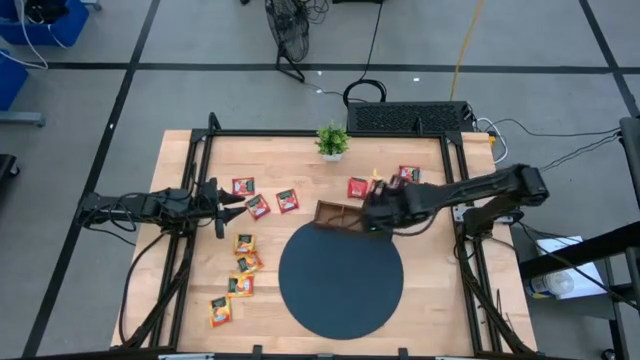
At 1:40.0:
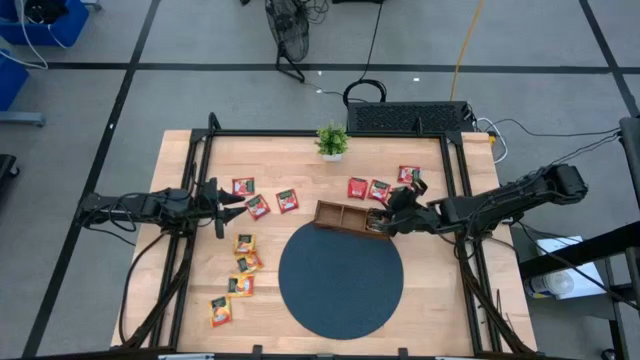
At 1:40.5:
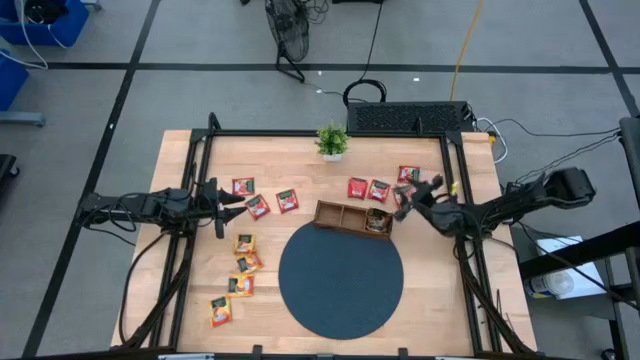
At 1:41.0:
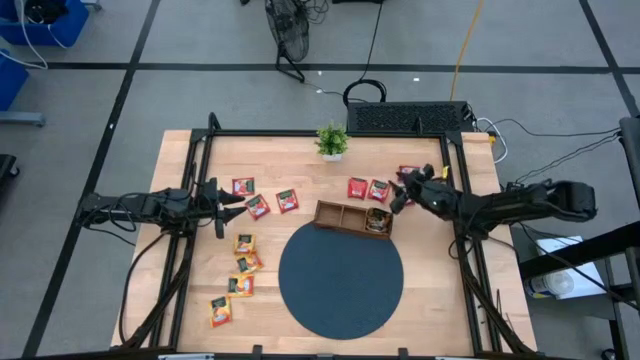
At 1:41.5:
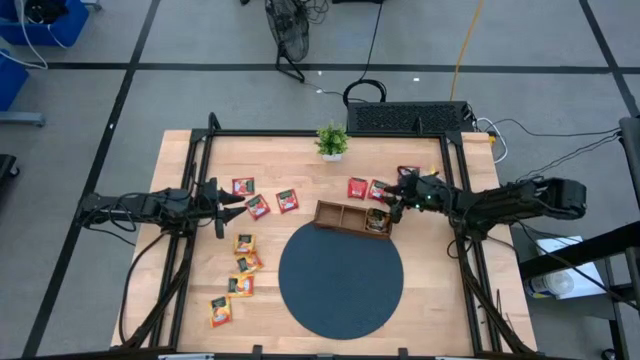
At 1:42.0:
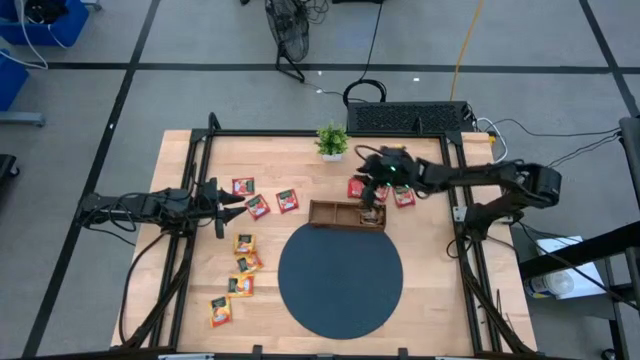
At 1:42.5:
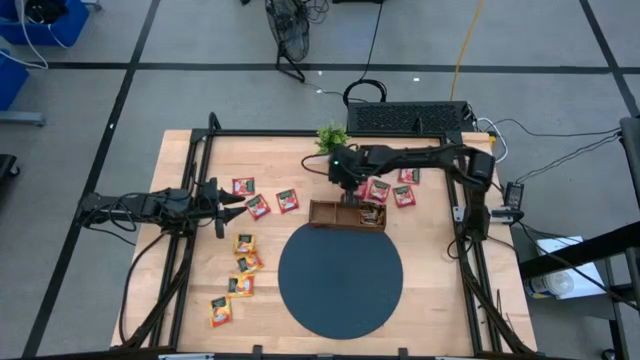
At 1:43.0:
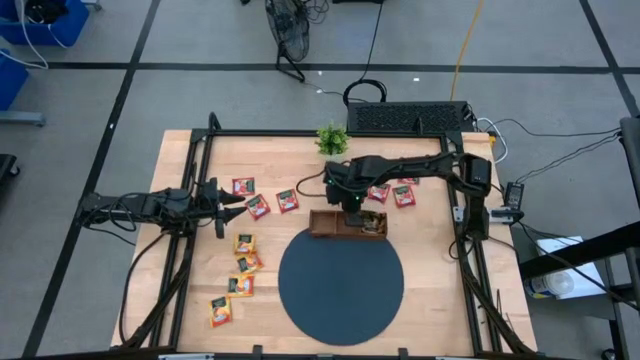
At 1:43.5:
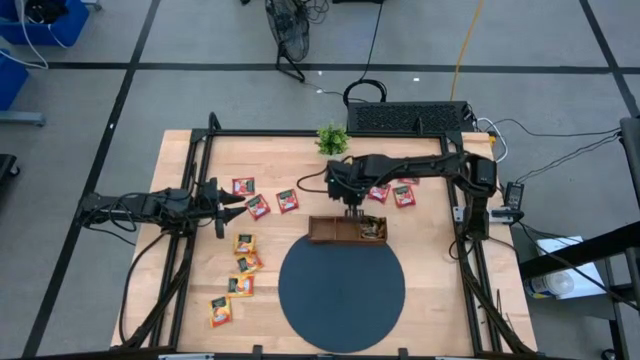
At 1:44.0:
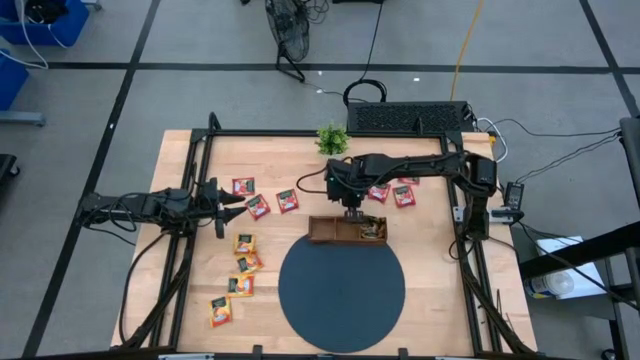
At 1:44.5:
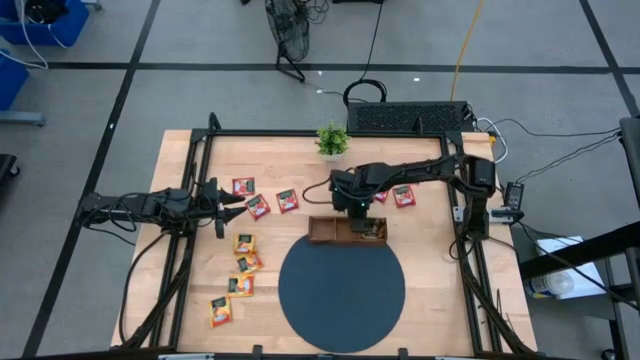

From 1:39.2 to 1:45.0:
Task: Pick & Place Tea
Adjust the wooden organizer on the table

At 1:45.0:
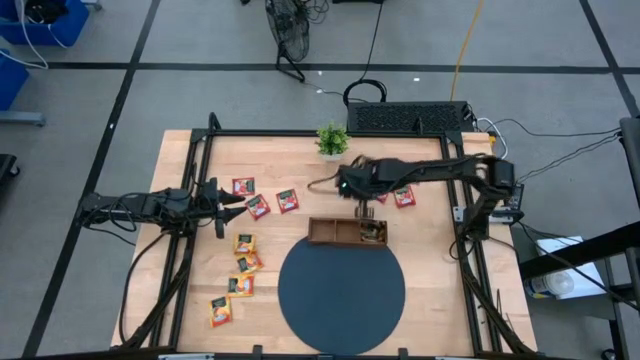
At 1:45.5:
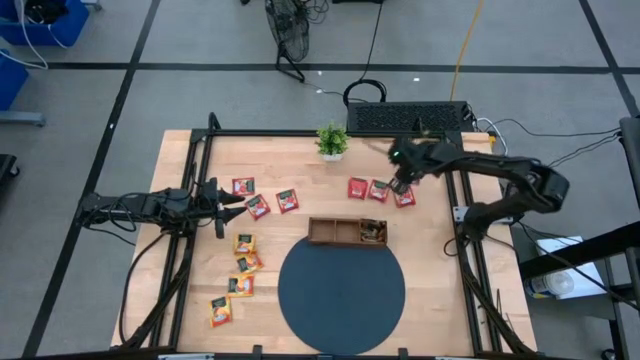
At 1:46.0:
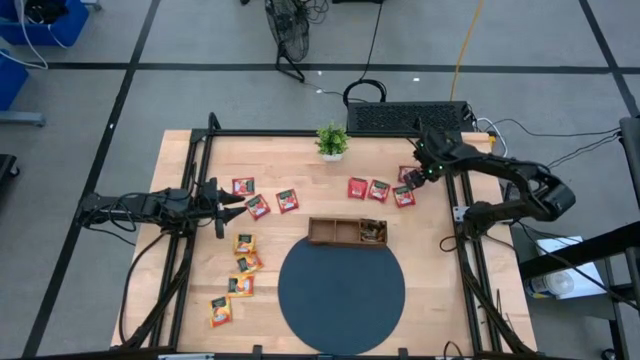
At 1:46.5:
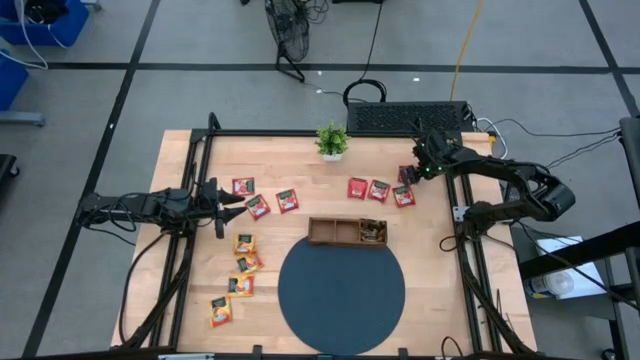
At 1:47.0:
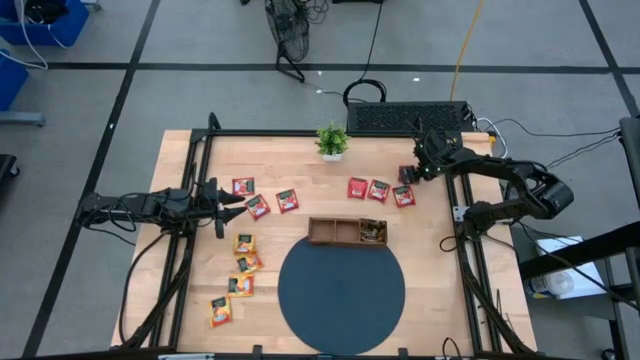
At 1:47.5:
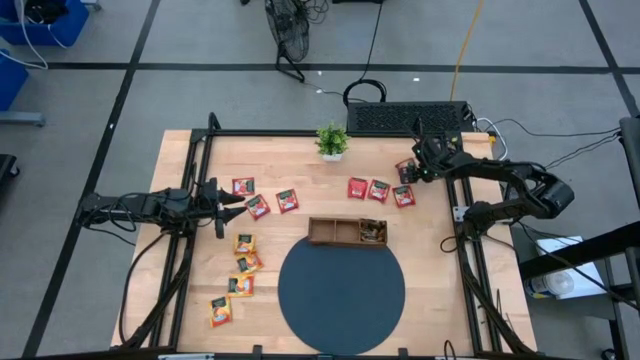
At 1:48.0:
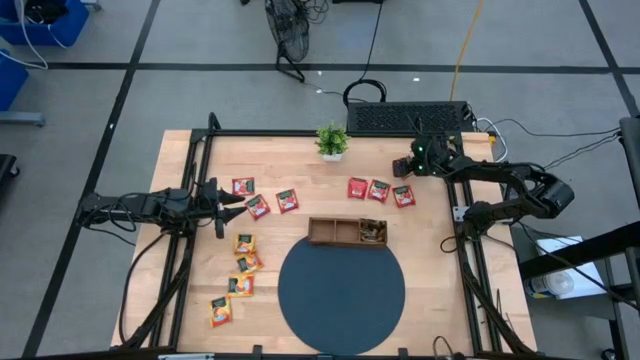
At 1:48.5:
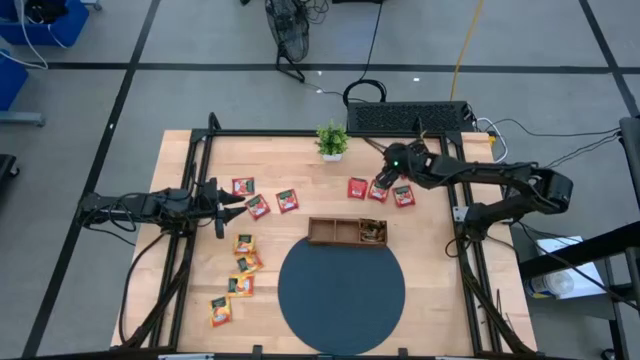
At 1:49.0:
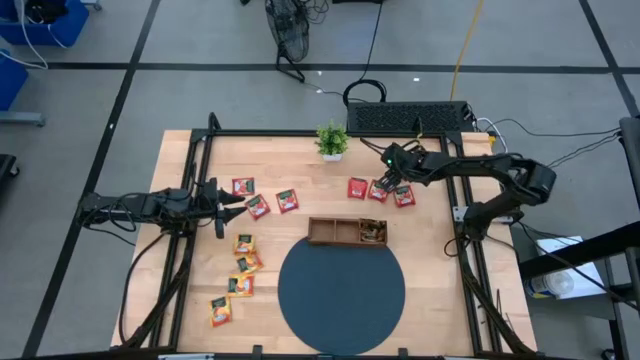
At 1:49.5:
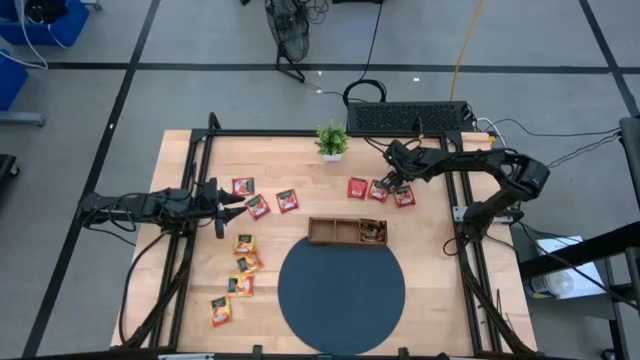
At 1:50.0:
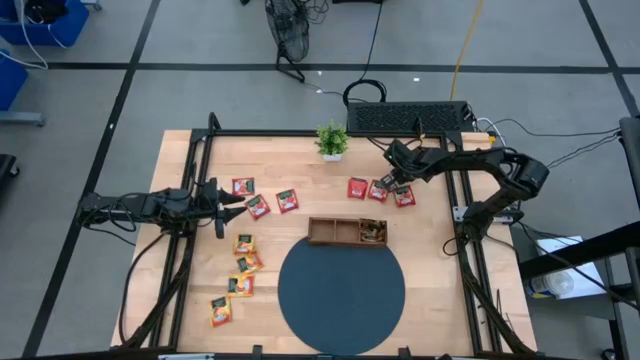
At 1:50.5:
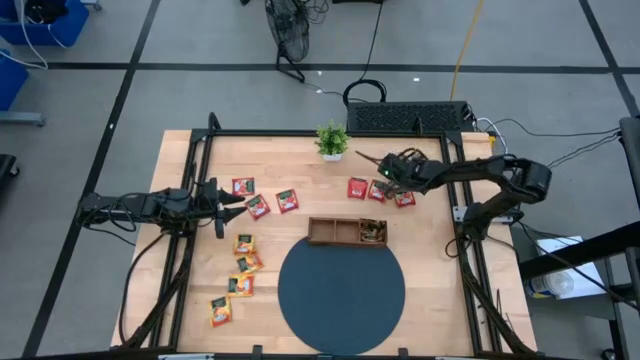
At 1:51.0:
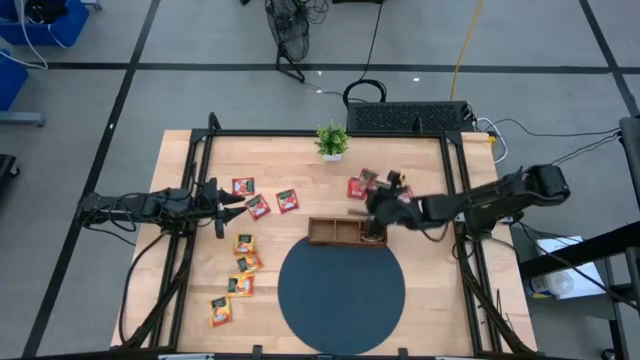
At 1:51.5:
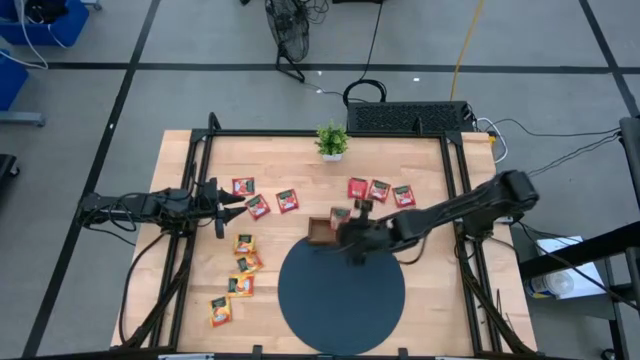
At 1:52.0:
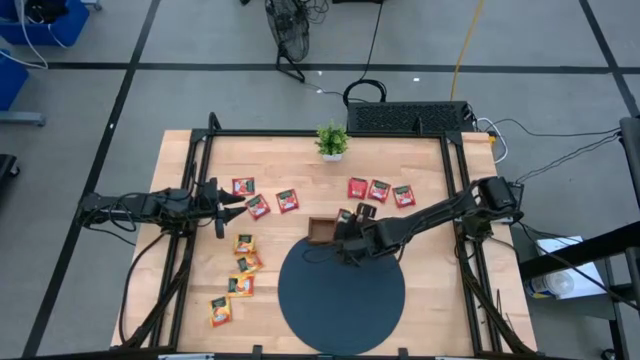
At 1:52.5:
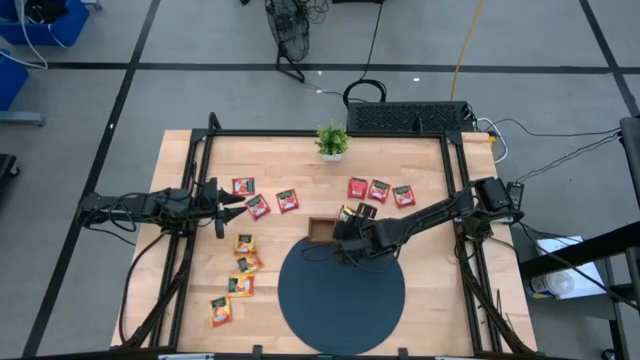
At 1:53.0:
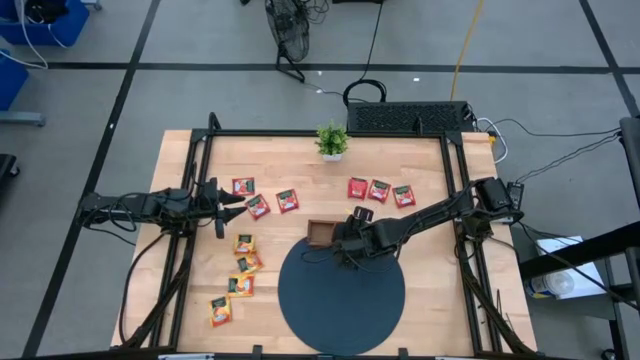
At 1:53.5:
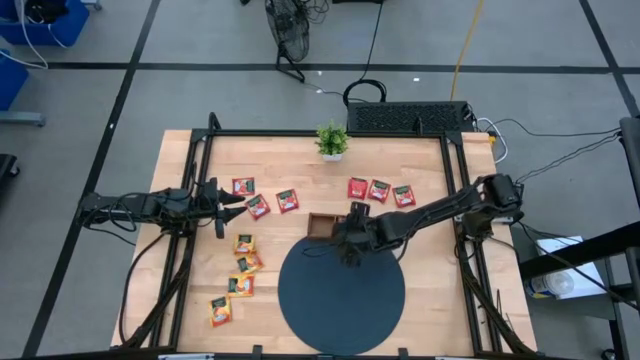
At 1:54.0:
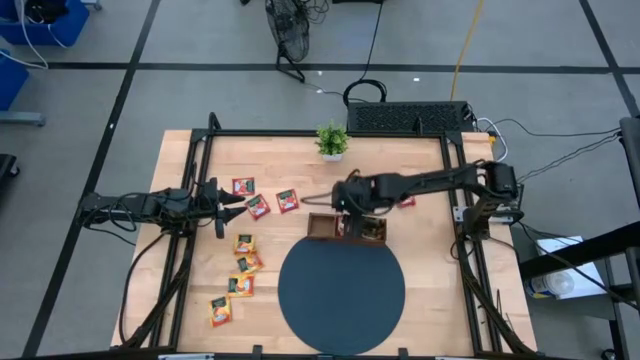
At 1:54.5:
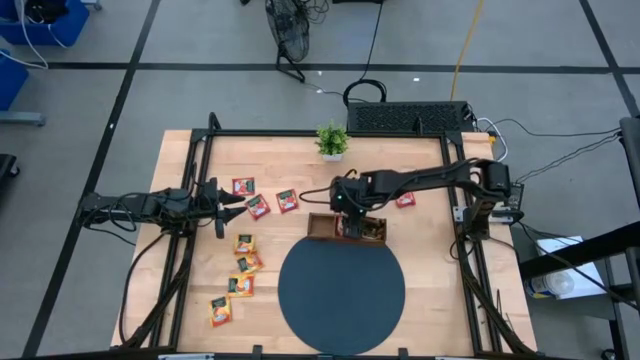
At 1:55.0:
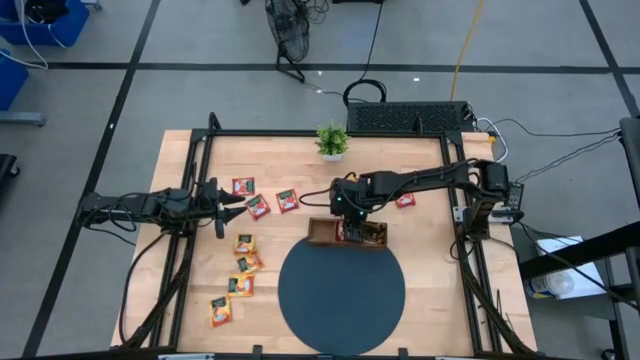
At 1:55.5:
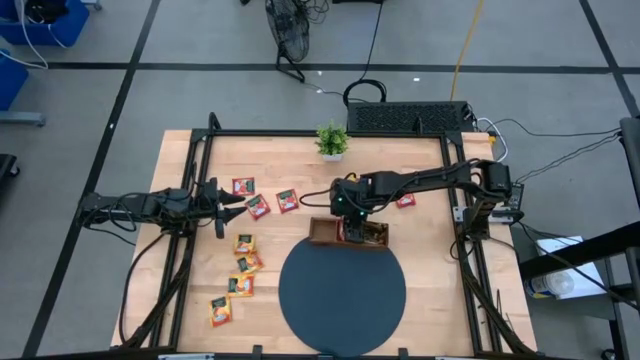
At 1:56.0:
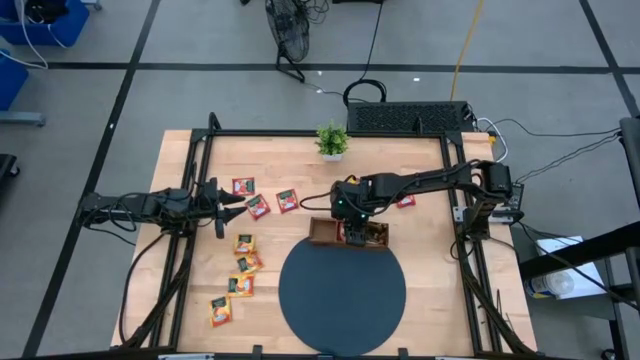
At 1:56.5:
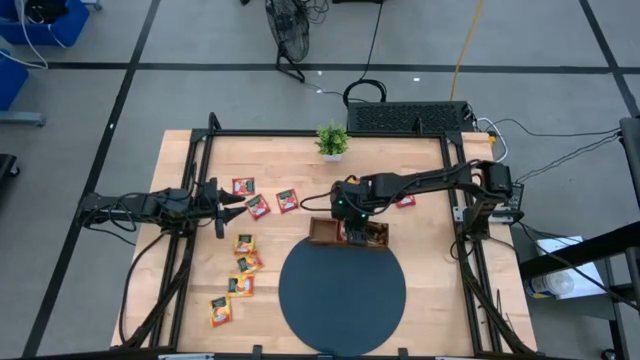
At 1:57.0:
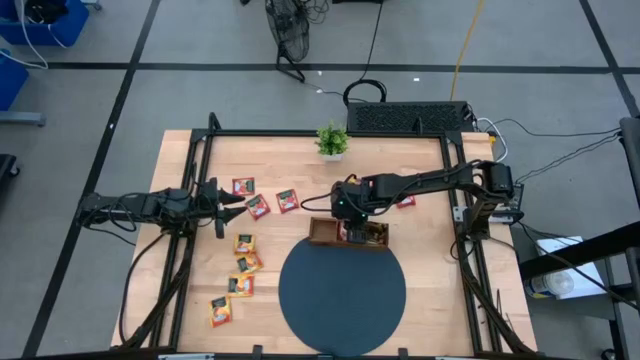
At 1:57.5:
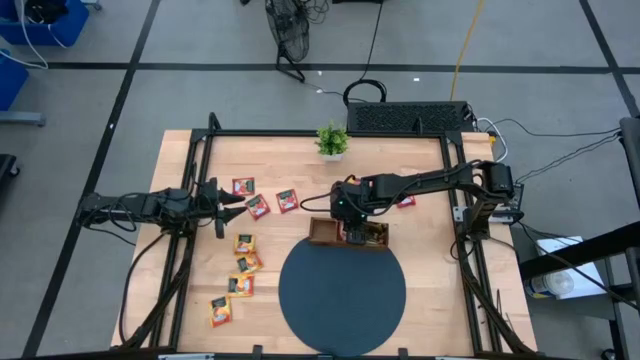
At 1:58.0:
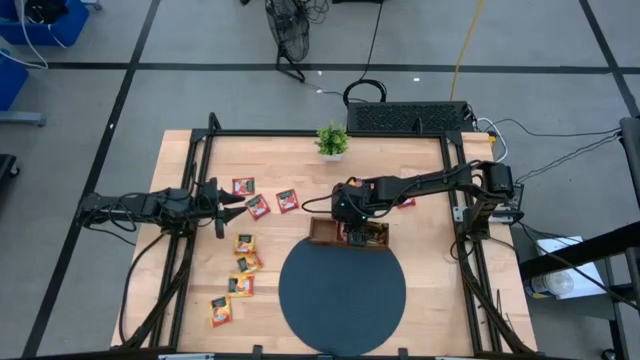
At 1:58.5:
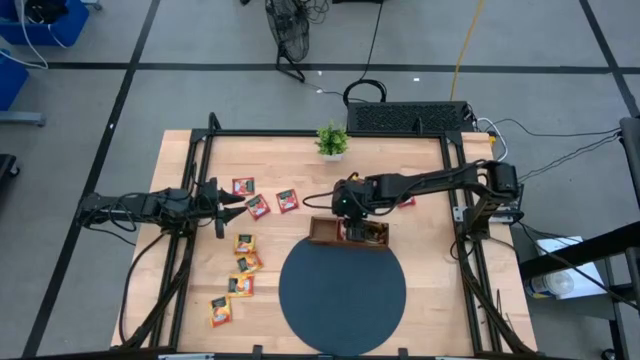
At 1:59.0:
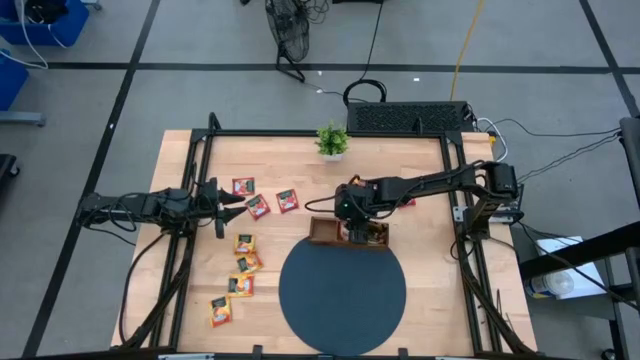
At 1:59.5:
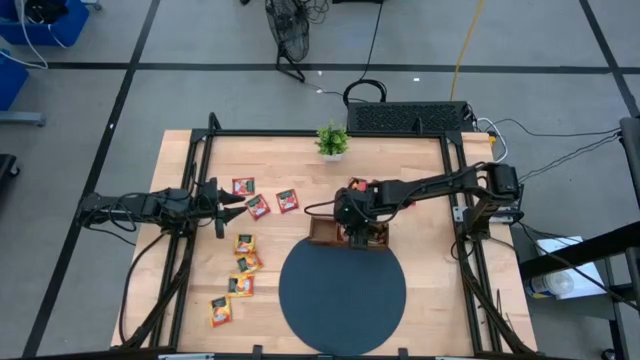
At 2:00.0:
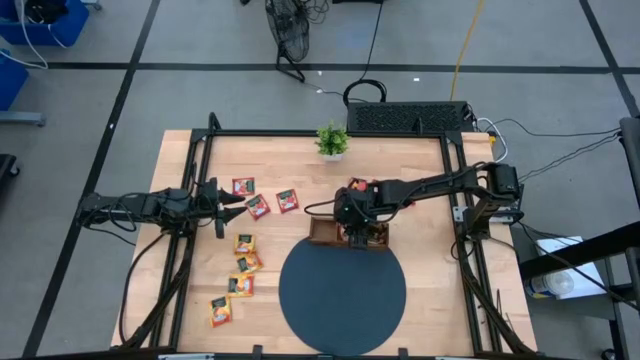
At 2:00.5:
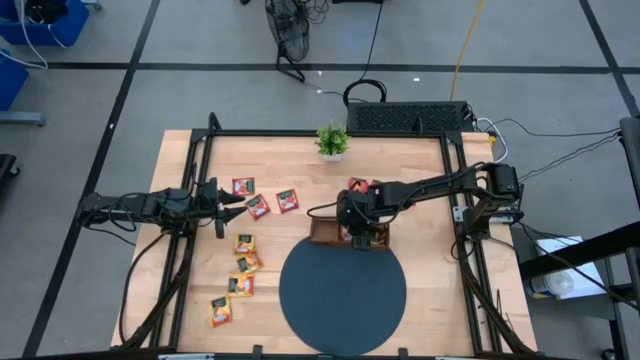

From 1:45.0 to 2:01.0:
Put the red tea bag into the middle slot of the wooden organizer
